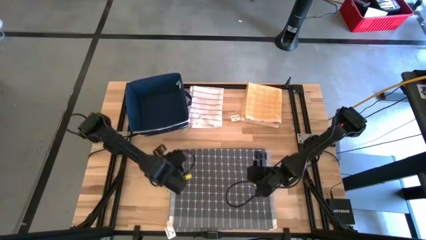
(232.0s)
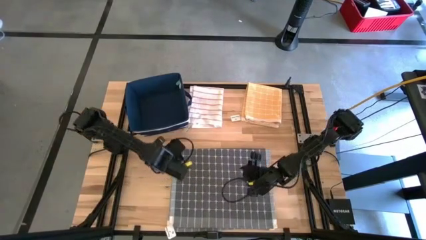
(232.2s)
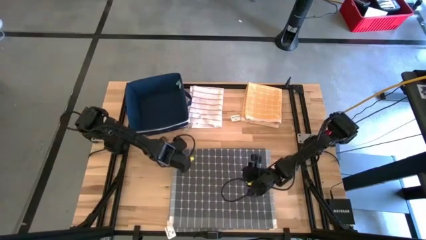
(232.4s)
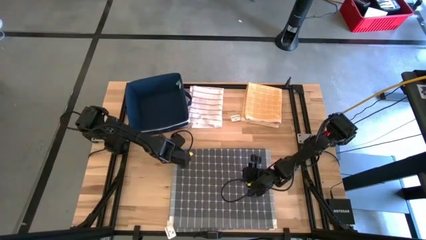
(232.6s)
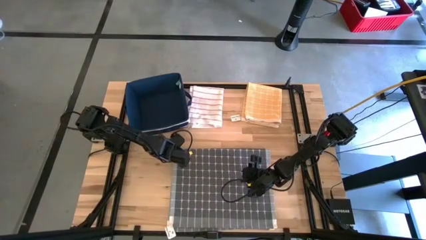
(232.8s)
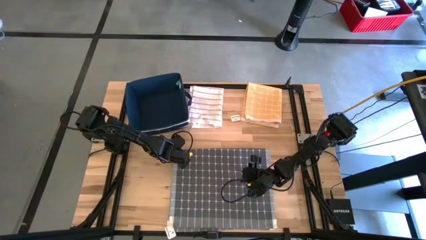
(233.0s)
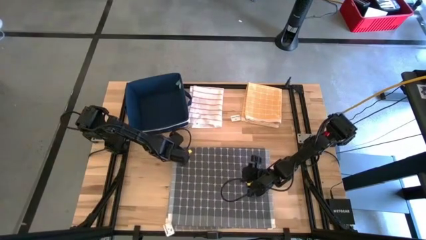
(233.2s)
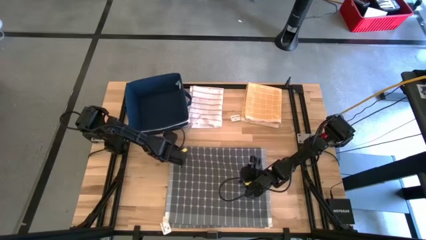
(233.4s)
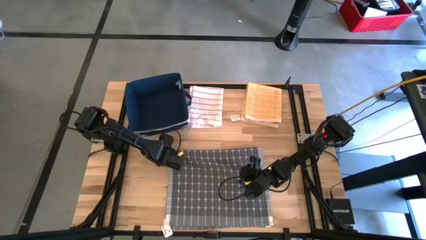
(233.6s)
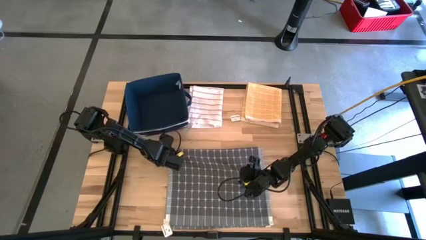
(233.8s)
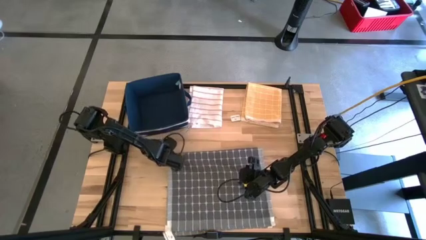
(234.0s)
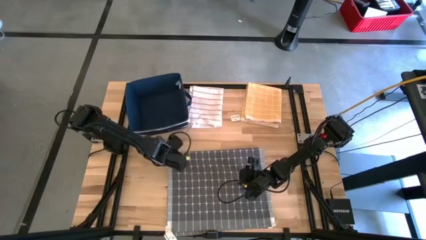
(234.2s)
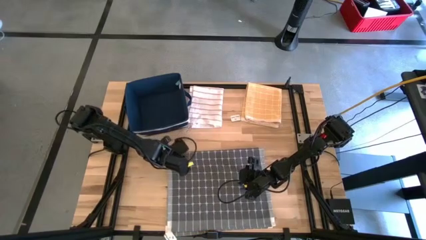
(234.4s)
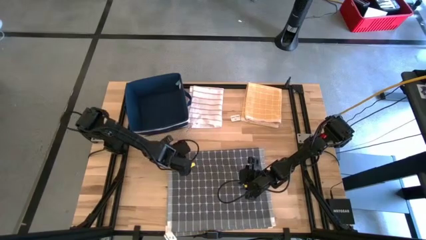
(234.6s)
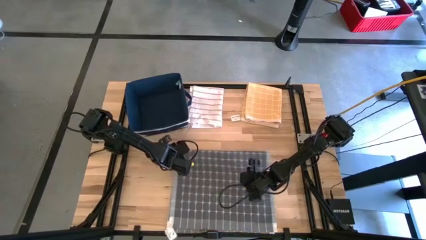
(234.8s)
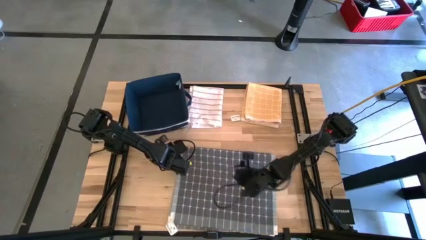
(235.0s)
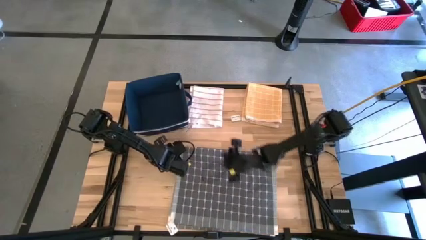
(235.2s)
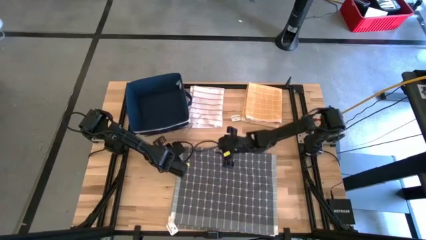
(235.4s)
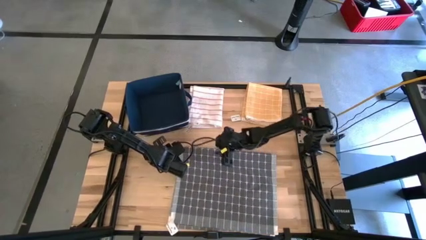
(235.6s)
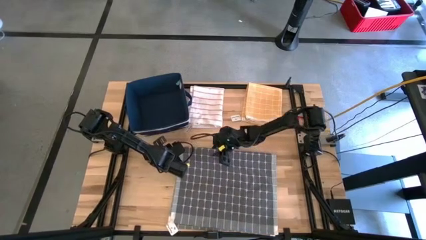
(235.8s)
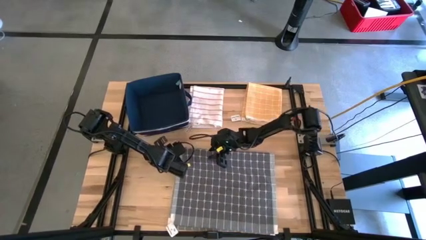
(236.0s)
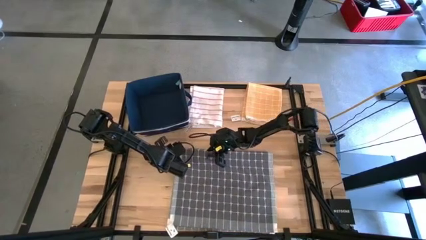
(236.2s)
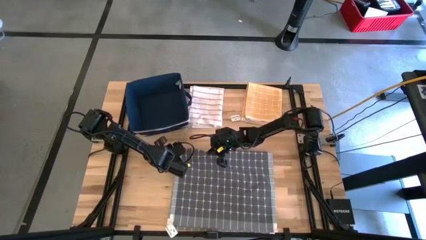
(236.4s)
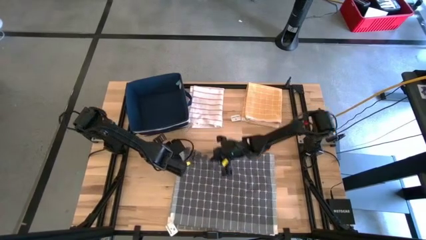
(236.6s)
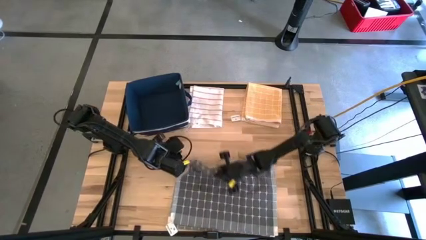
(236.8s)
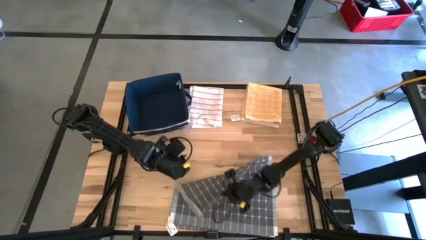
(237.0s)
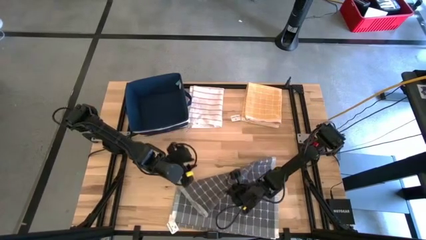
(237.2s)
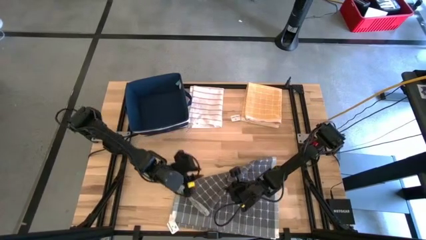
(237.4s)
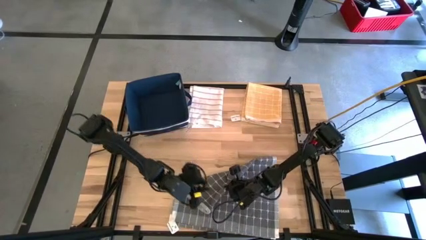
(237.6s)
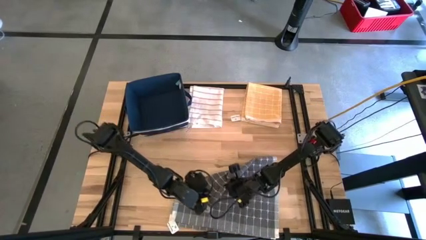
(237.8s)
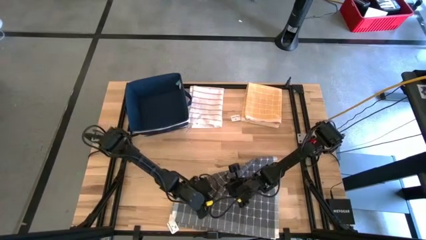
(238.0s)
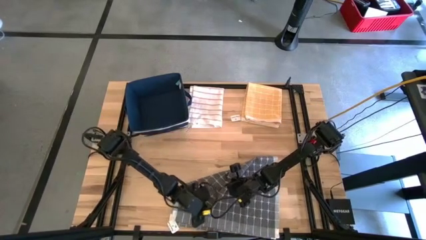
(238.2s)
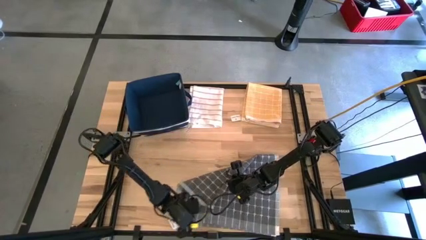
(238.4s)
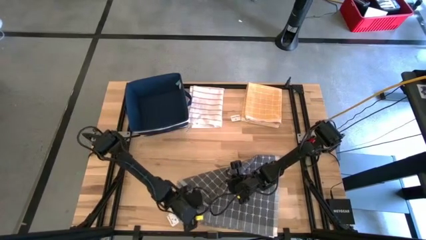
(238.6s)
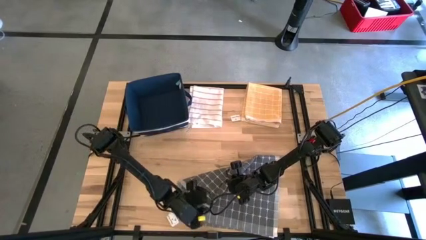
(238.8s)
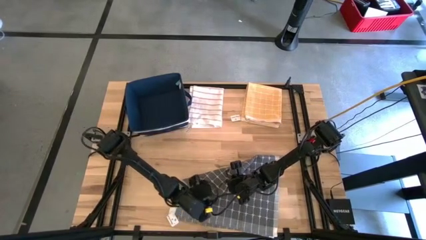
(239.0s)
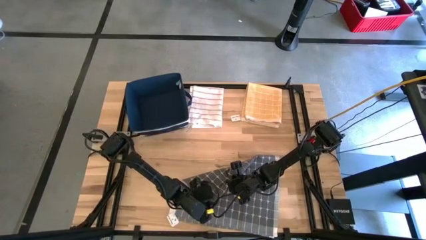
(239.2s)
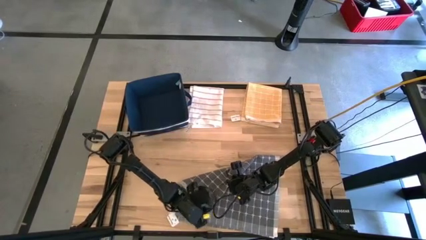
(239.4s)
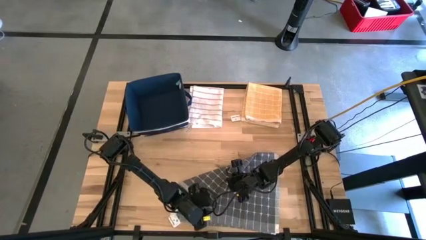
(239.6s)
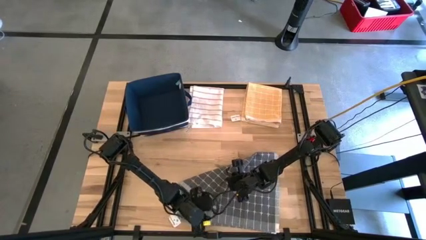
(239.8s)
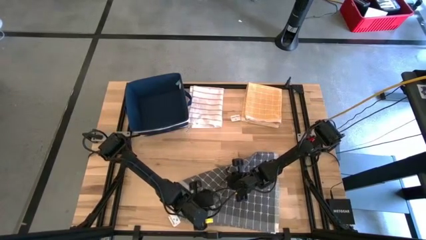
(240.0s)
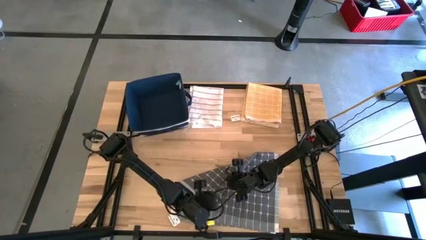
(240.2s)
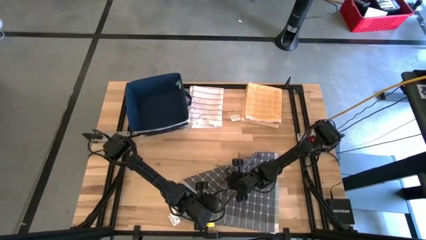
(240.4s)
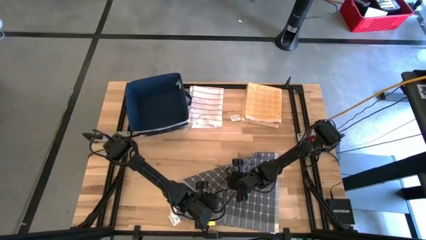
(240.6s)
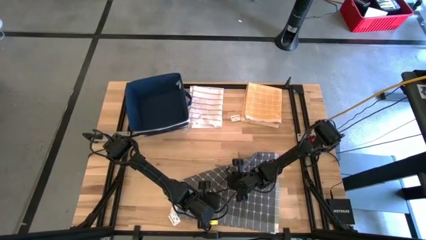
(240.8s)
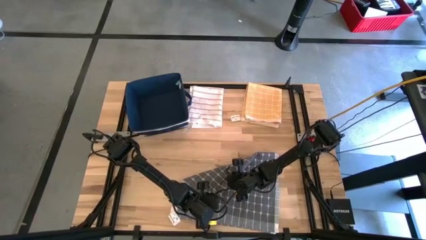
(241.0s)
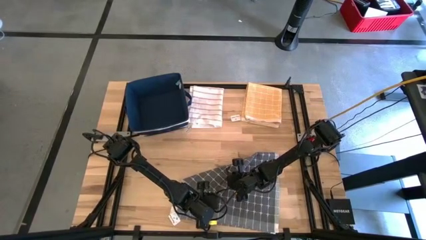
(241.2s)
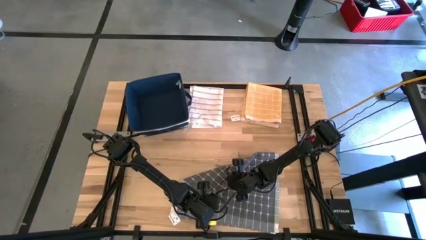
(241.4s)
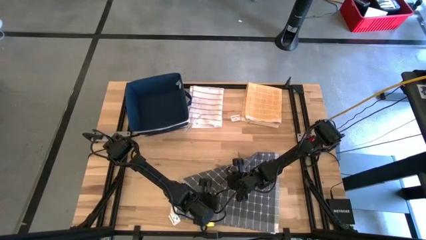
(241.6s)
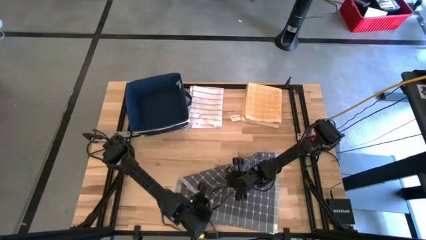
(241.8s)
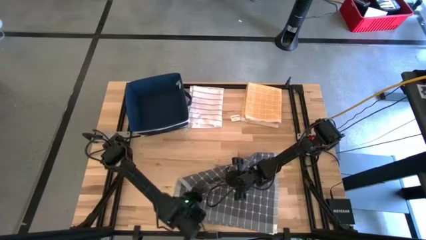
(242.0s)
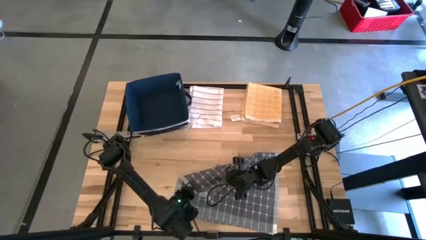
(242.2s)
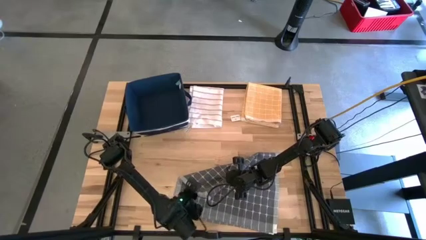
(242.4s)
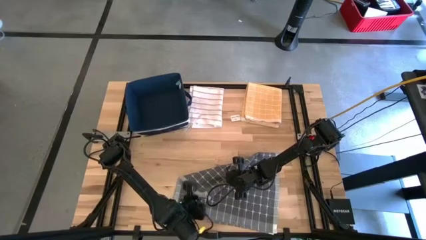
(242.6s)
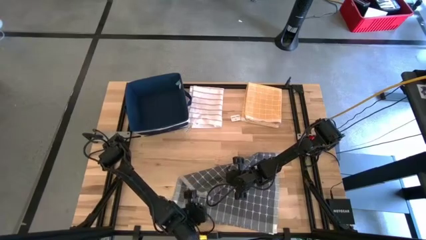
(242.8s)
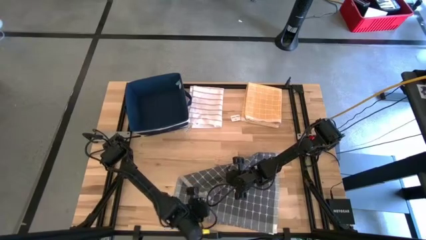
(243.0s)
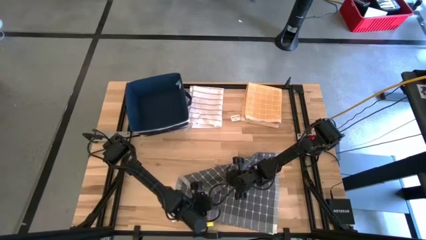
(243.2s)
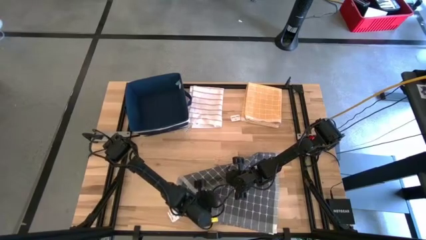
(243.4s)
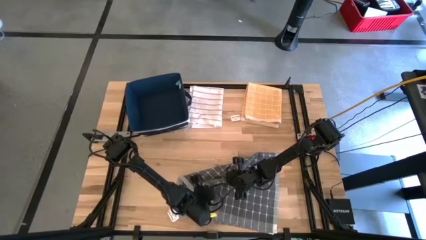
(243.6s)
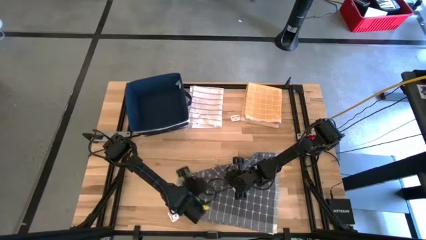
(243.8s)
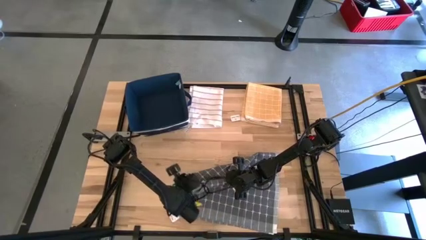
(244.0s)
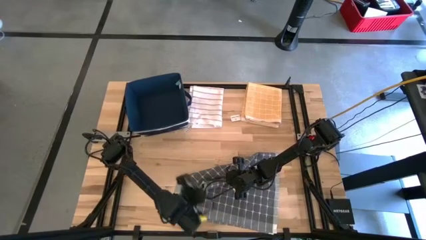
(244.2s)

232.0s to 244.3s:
Task: Fold towel
Fold the gray towel

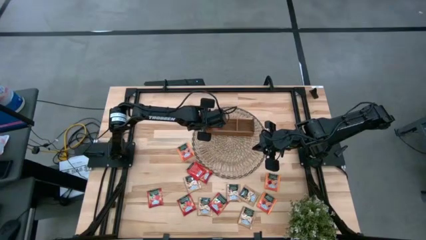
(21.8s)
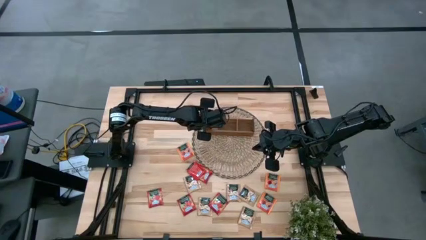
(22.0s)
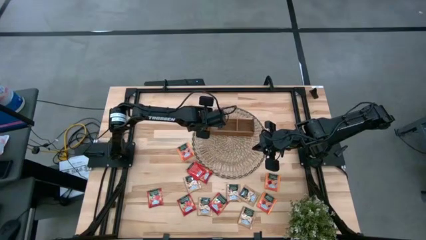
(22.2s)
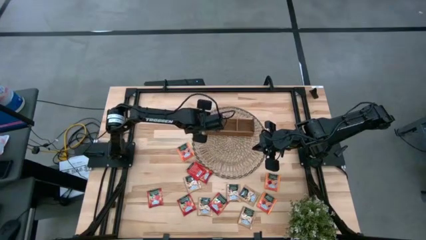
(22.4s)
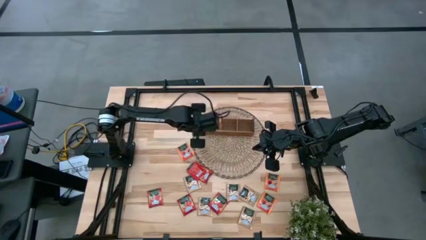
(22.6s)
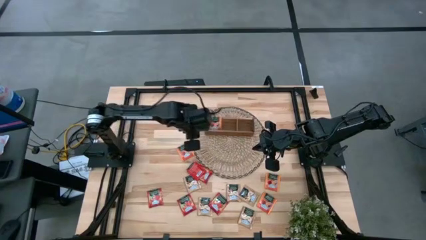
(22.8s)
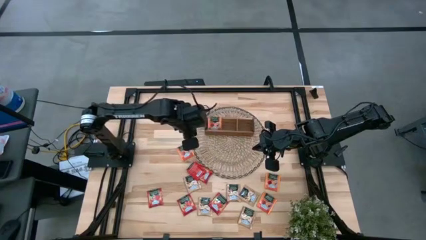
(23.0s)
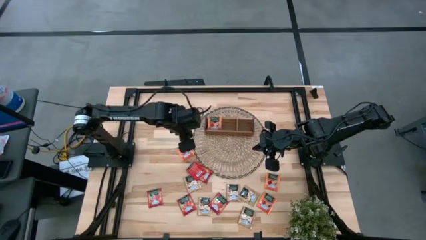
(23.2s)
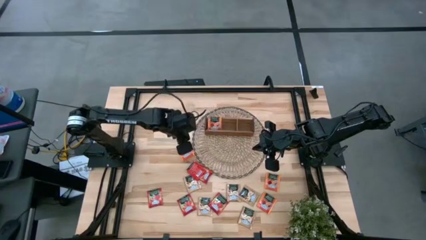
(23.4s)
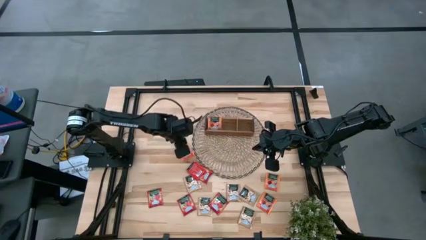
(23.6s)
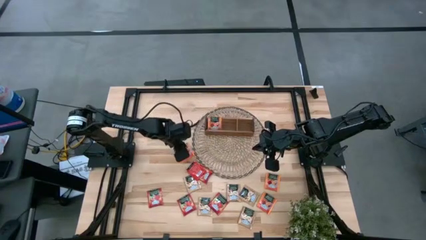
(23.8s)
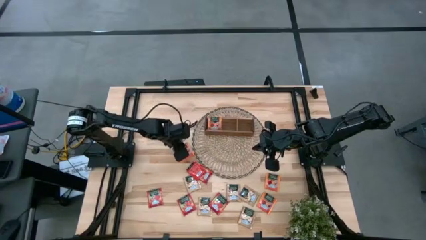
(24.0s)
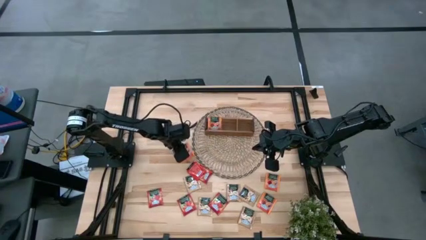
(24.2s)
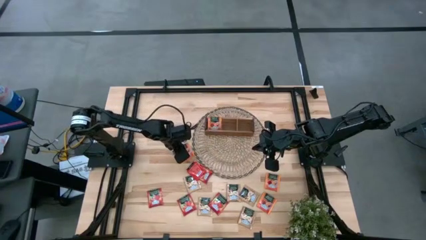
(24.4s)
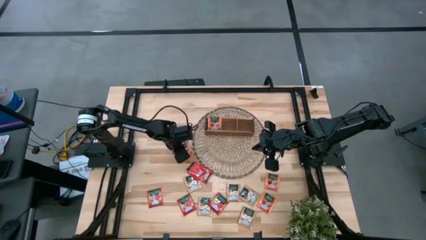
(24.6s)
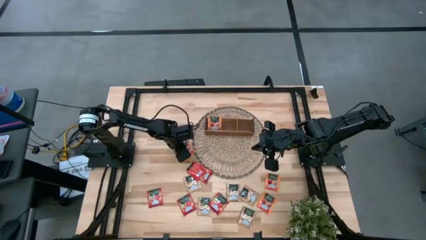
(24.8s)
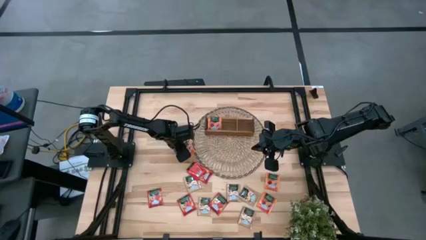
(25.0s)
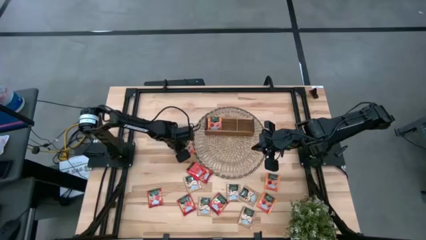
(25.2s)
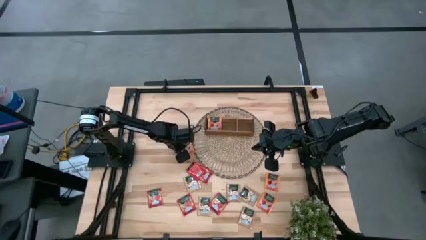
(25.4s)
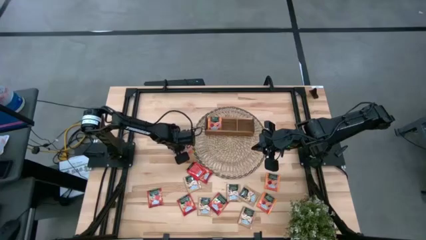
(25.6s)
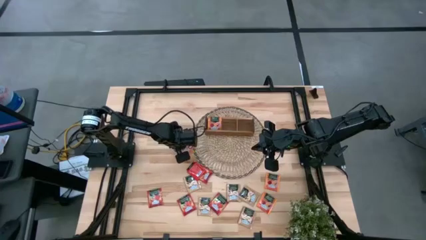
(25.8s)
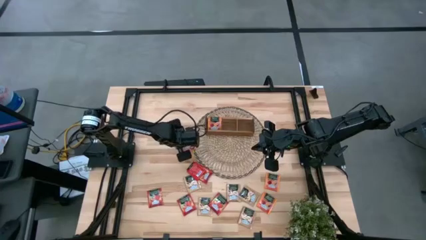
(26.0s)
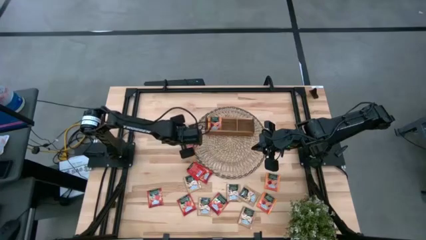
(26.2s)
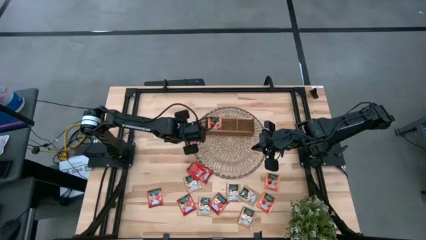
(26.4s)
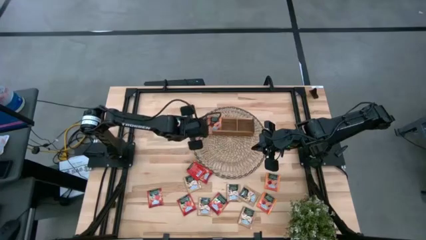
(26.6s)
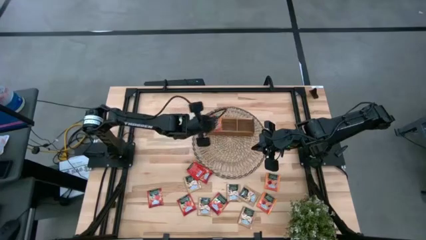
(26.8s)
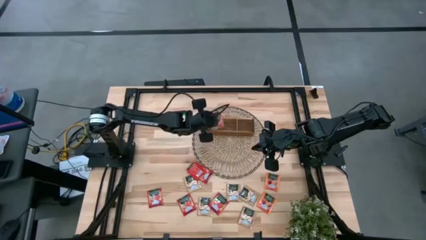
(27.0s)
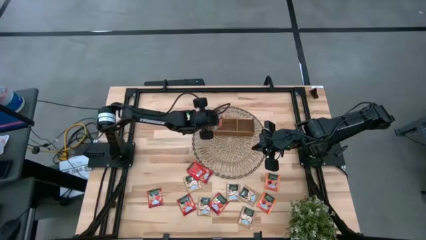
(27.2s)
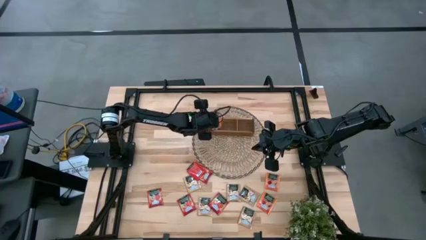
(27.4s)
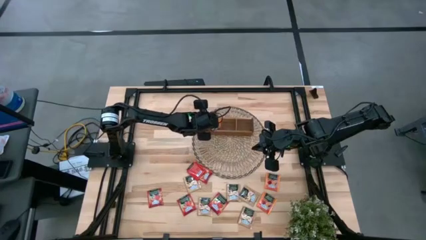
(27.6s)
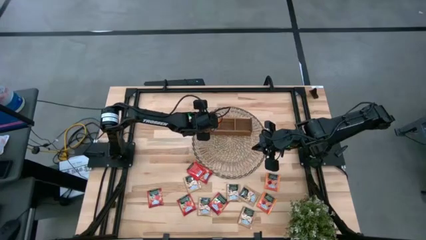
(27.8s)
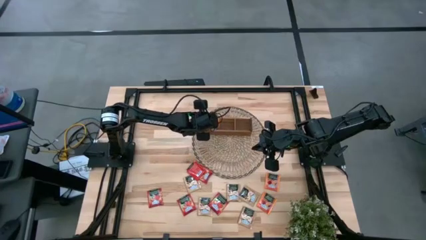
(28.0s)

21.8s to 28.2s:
Task: Pick & Place Tea
Put the orange tea bag into the left section of the wooden organizer
